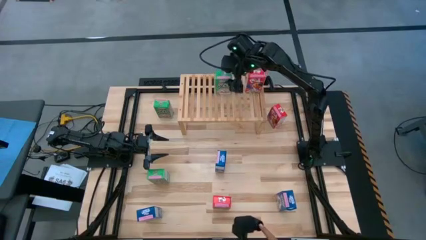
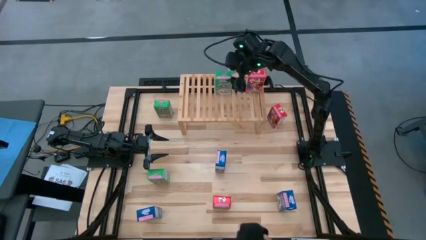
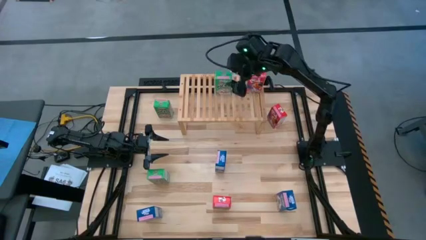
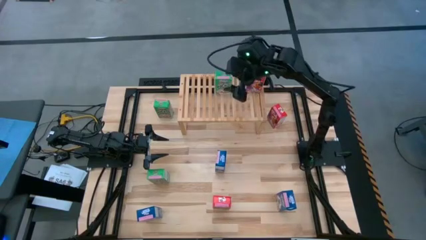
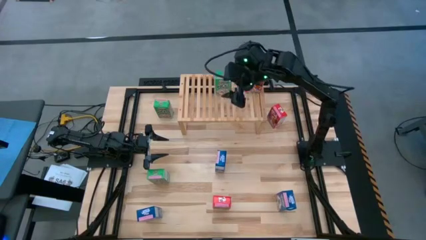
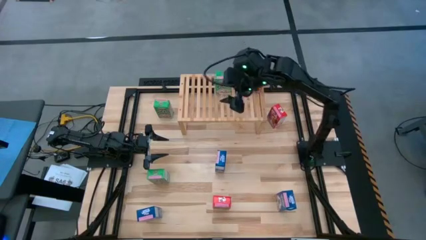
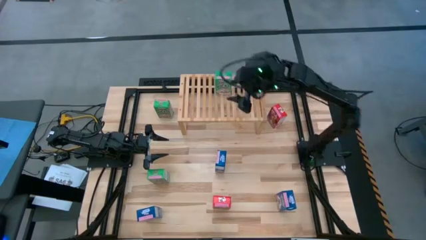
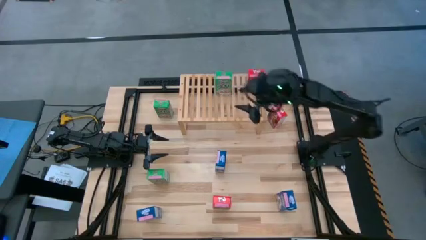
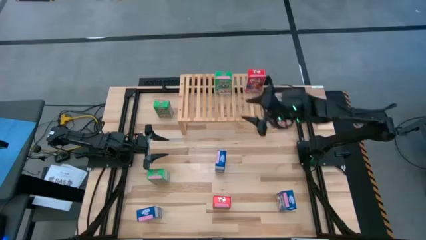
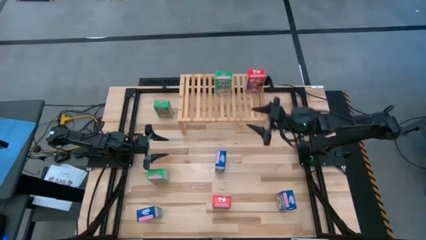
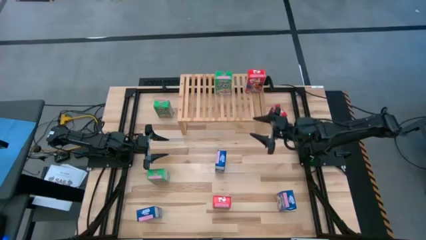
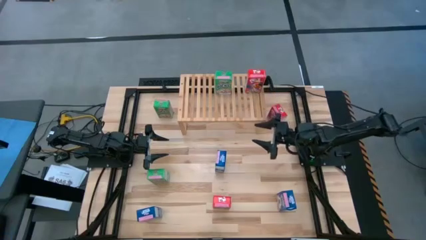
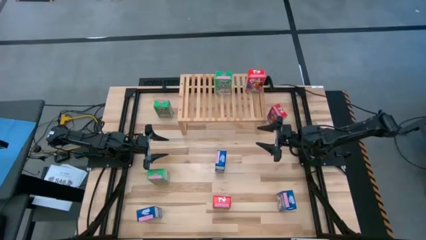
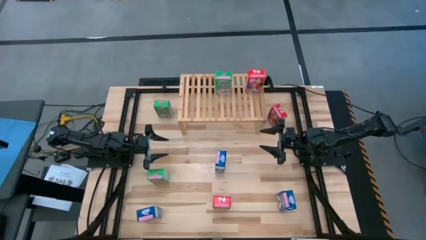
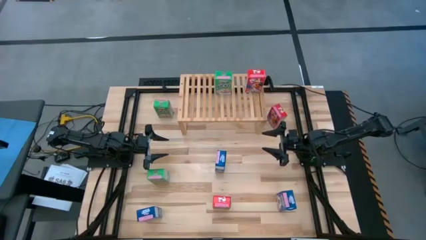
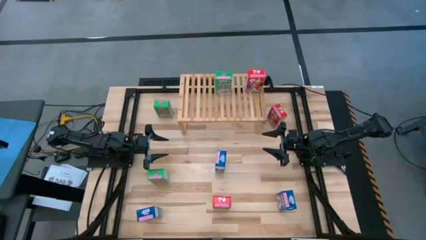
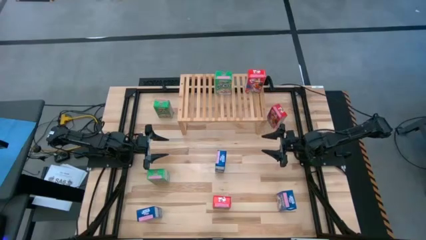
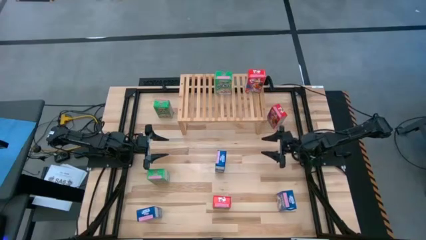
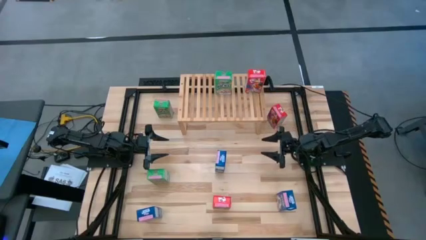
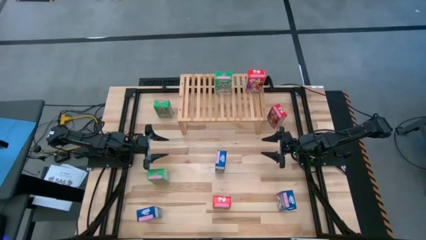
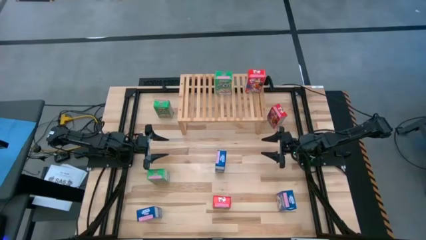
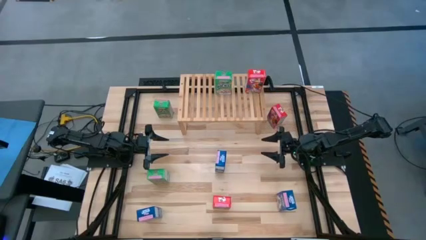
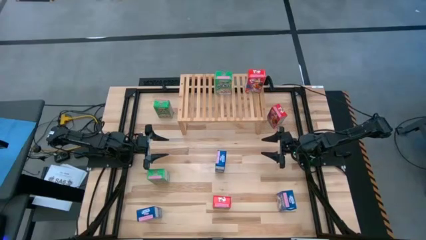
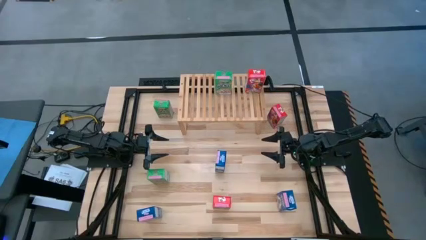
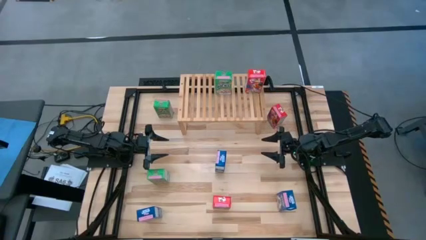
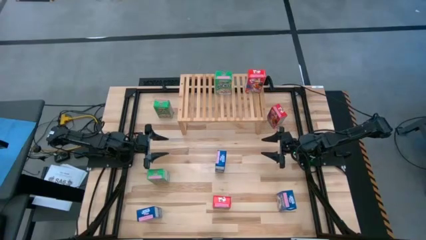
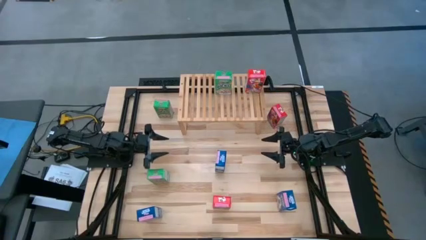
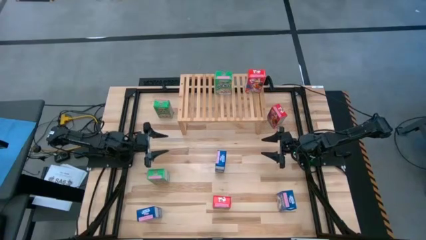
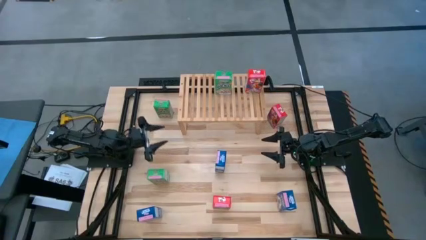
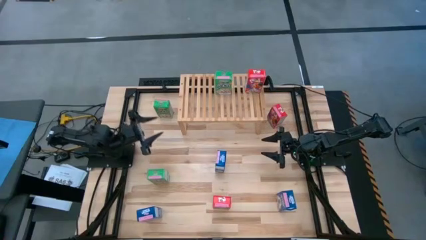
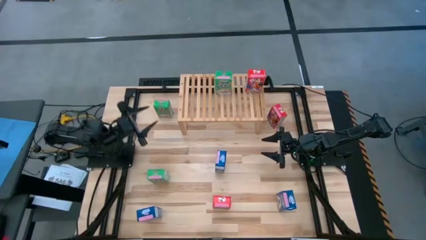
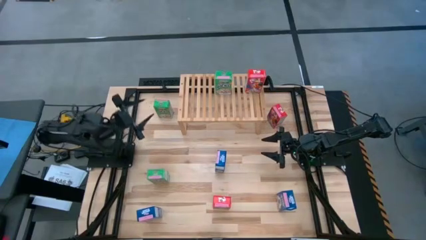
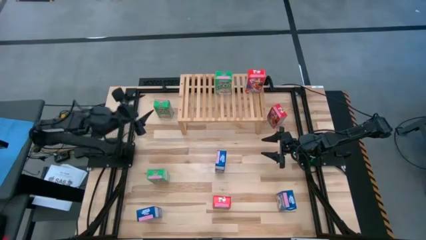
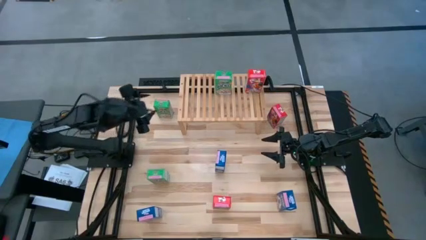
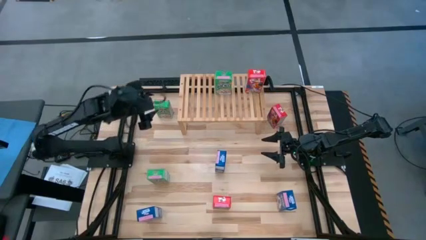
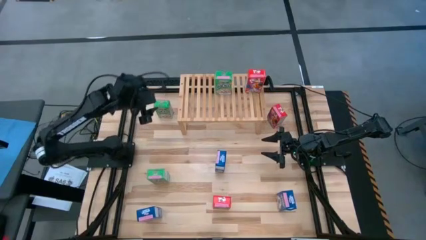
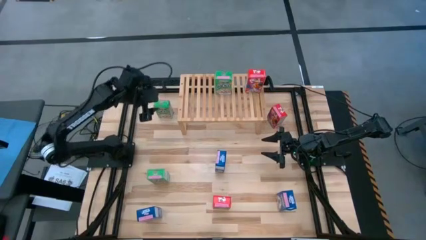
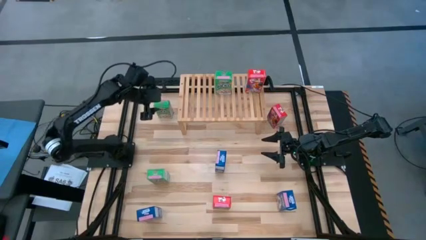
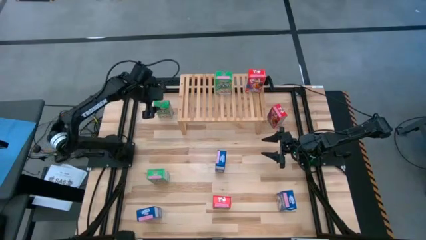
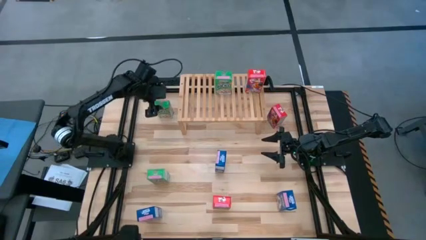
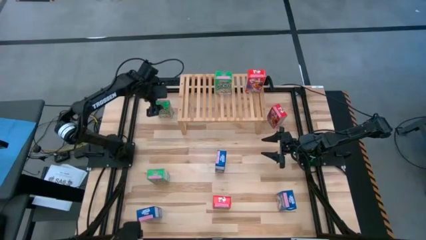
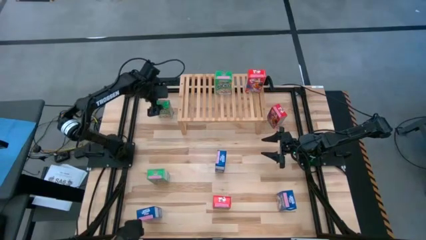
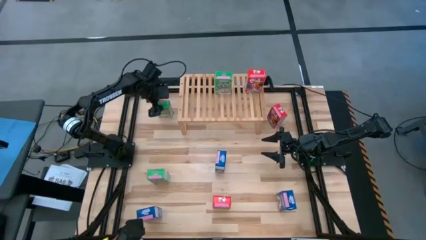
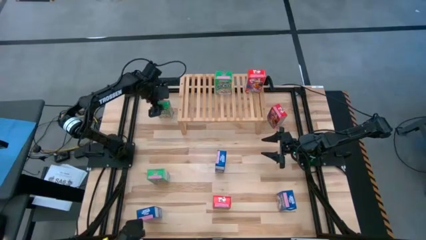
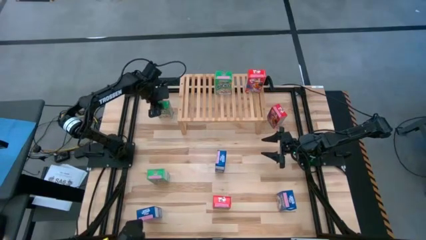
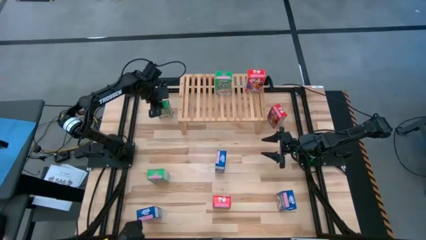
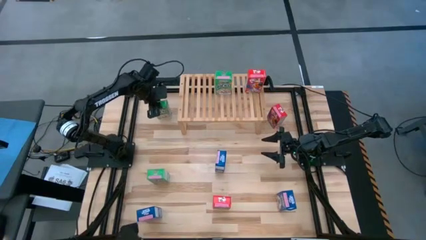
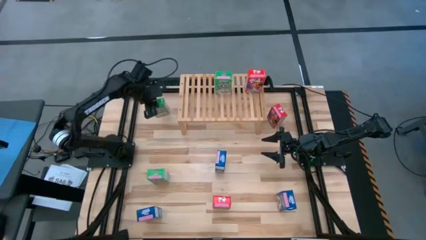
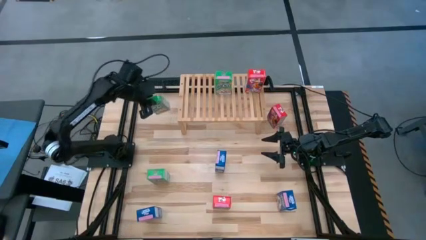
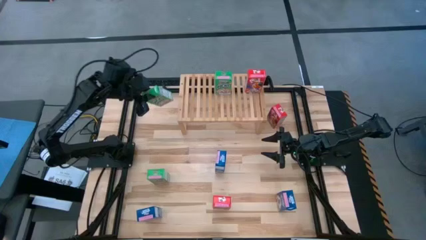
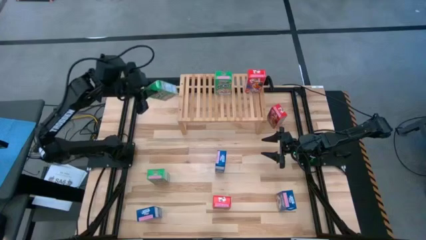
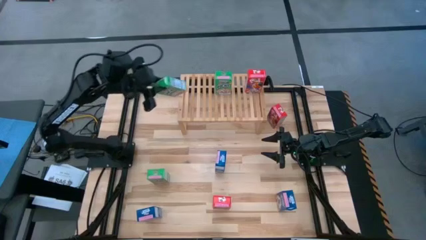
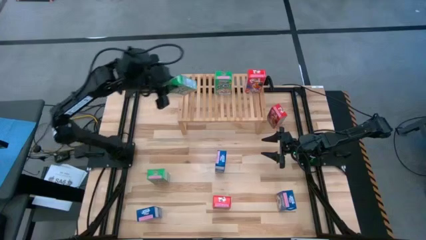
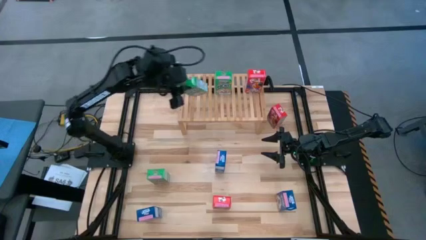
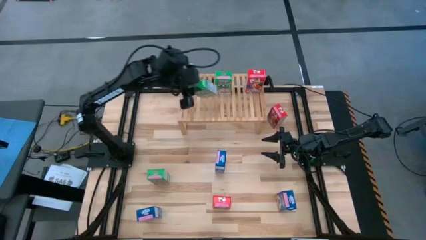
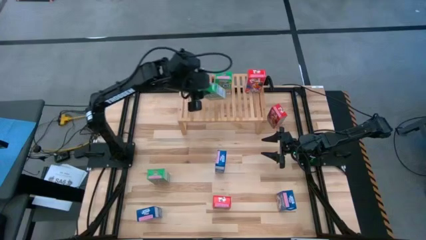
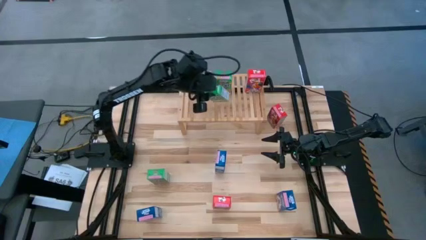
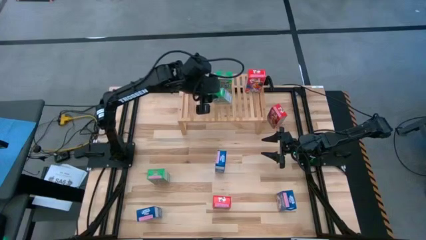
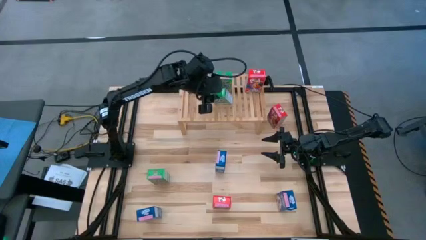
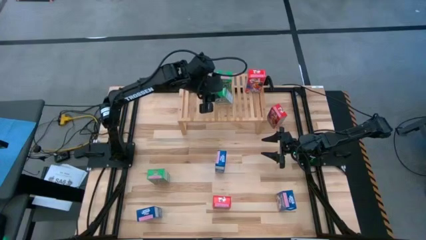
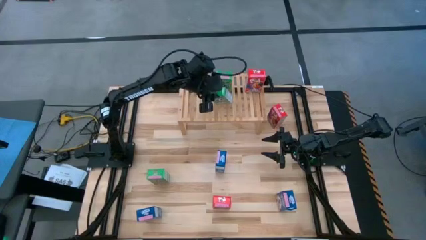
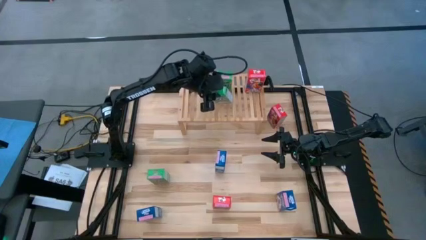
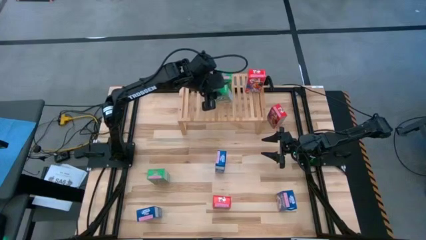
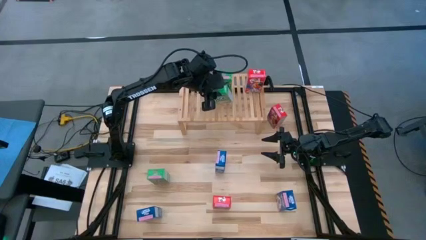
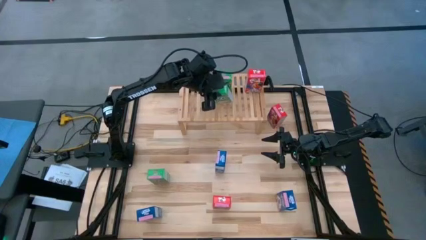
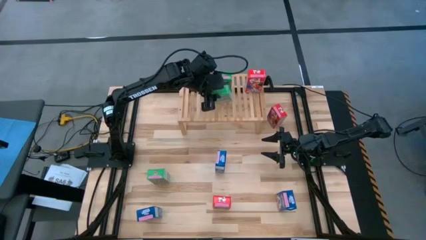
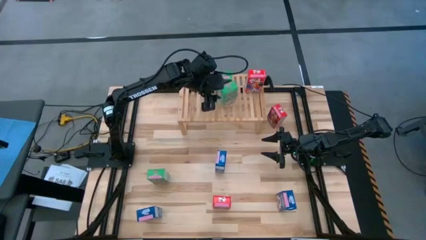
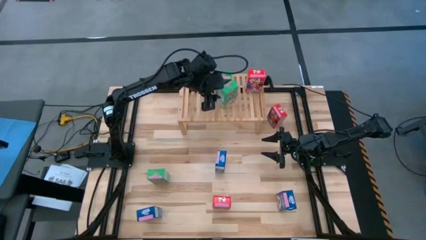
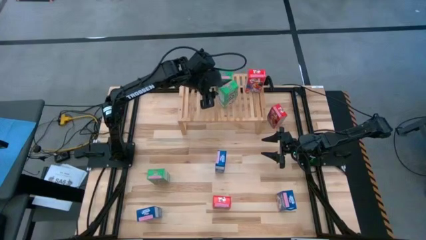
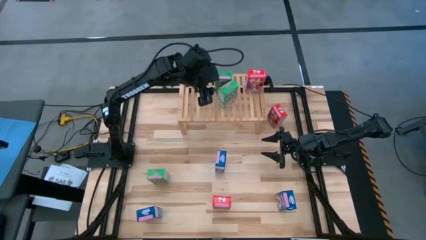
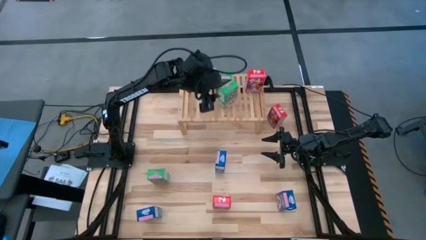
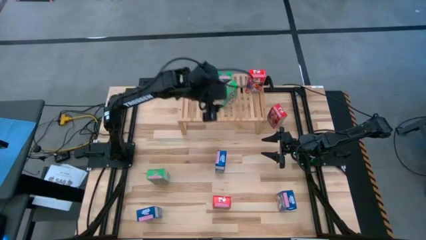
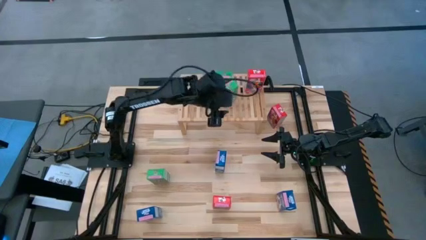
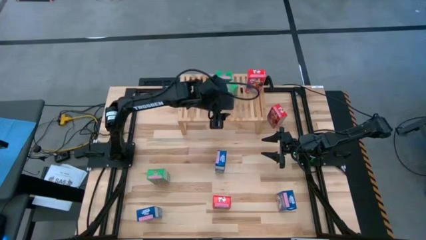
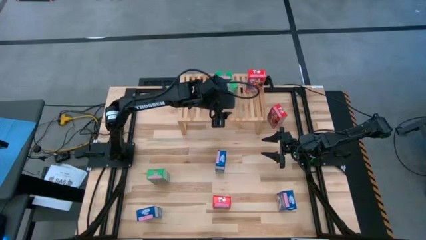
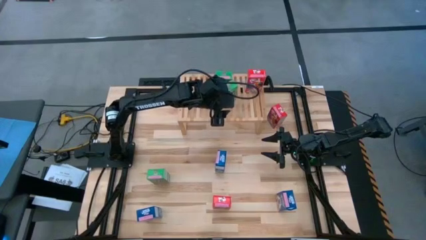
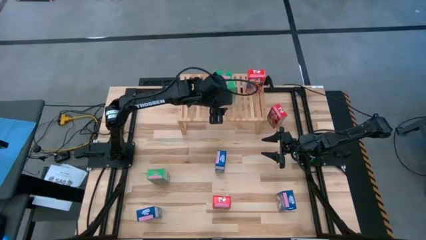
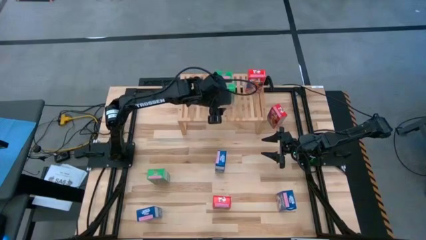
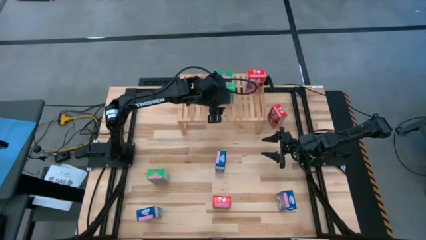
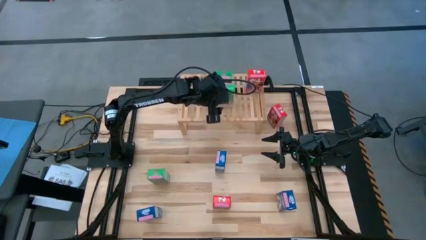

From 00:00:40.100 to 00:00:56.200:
Task: Stack cereal on shelf
Put the top green cereal box on the shelf aligned with the other green cereal box
